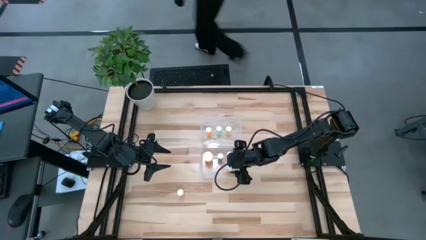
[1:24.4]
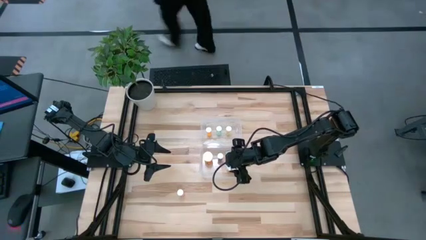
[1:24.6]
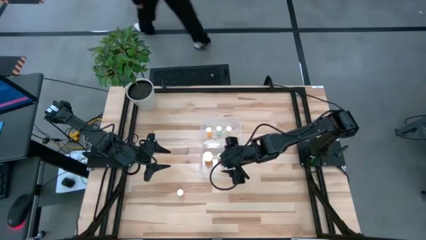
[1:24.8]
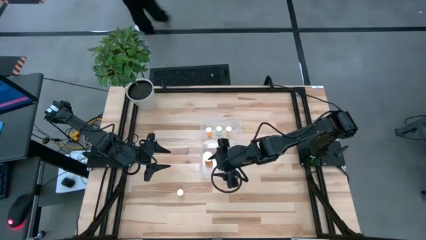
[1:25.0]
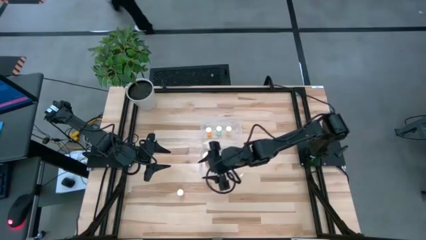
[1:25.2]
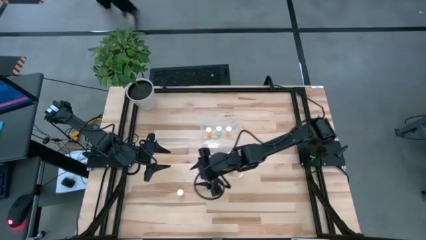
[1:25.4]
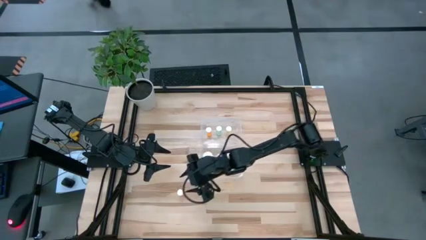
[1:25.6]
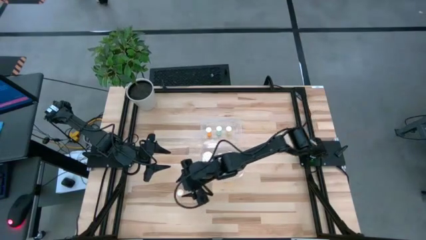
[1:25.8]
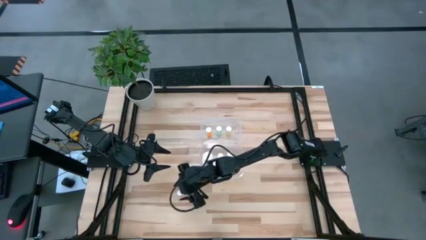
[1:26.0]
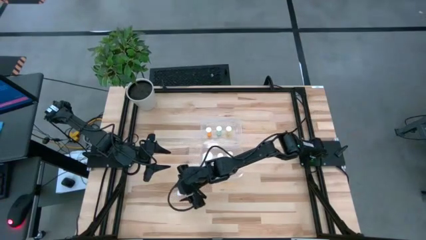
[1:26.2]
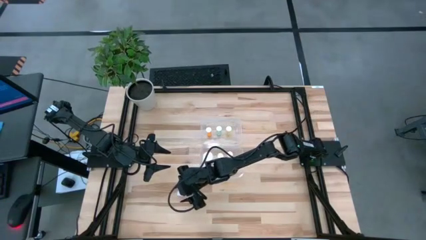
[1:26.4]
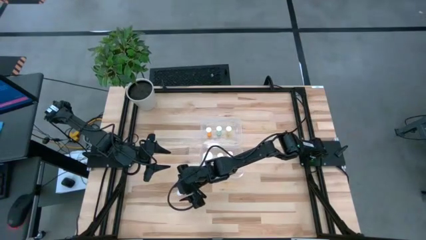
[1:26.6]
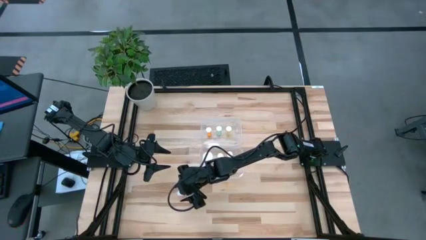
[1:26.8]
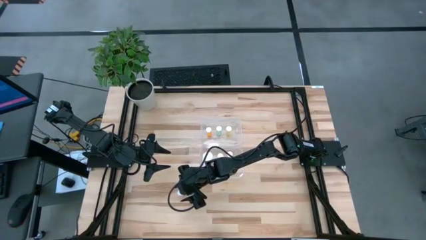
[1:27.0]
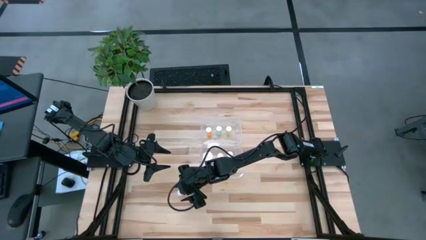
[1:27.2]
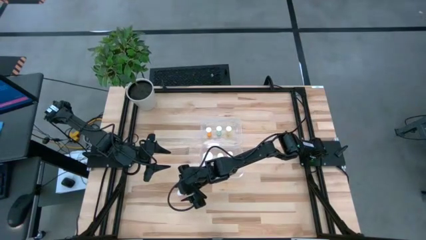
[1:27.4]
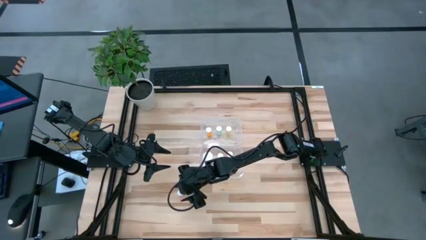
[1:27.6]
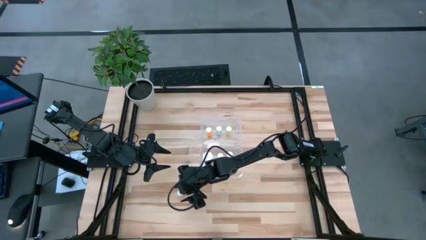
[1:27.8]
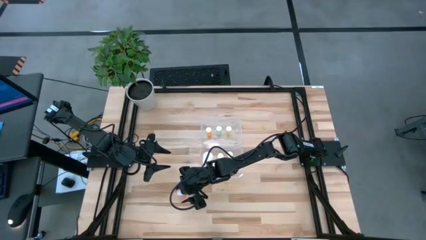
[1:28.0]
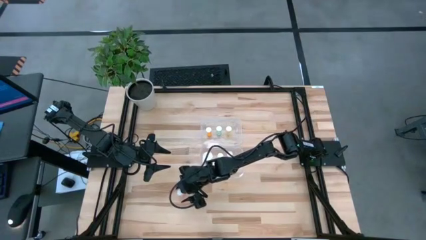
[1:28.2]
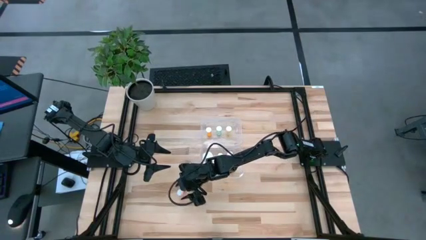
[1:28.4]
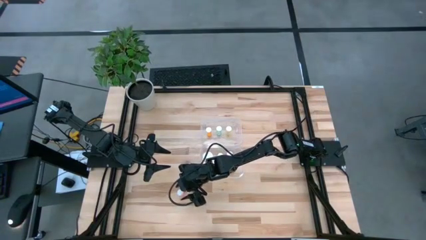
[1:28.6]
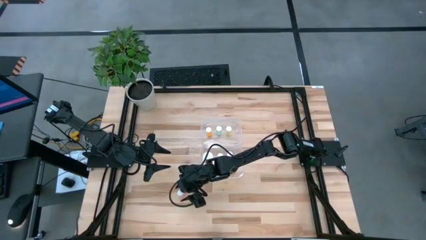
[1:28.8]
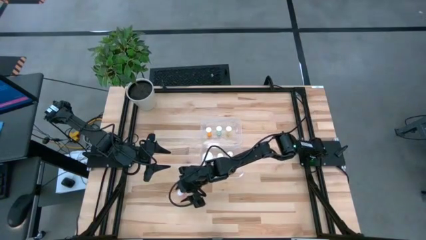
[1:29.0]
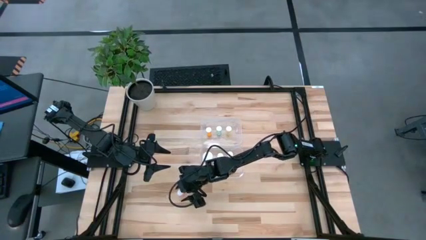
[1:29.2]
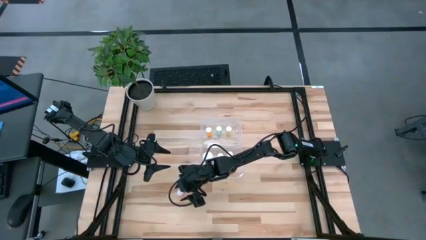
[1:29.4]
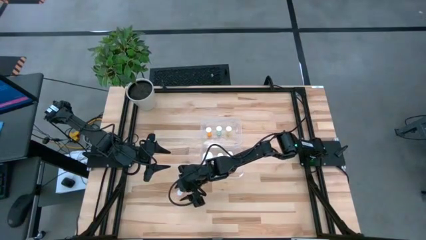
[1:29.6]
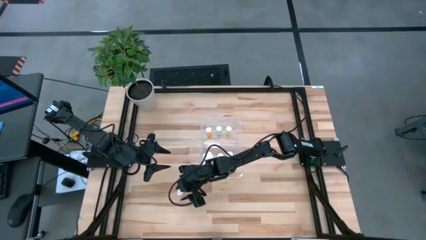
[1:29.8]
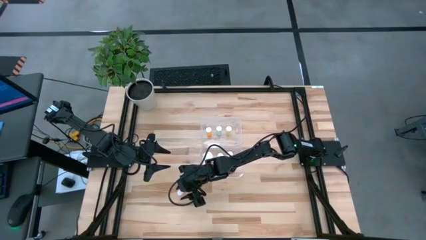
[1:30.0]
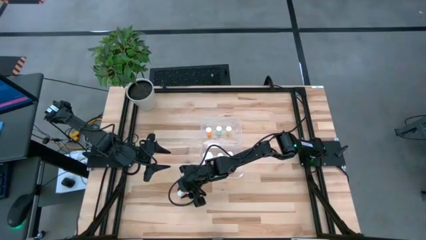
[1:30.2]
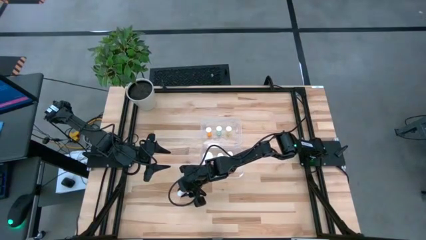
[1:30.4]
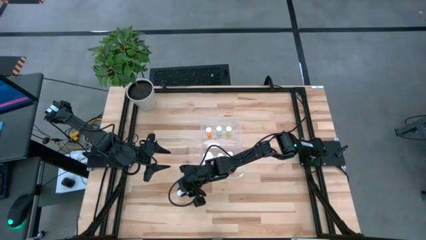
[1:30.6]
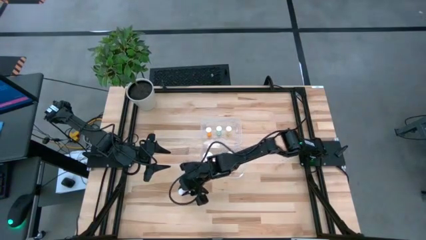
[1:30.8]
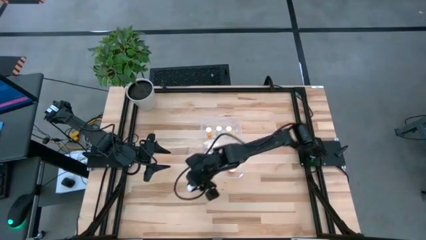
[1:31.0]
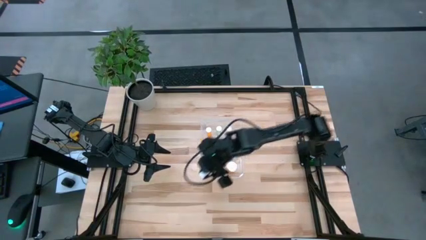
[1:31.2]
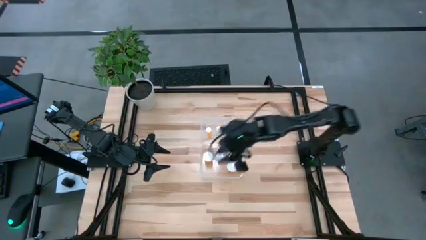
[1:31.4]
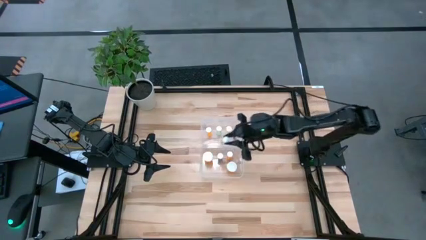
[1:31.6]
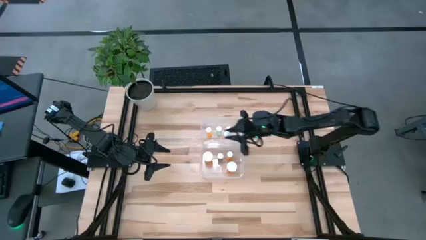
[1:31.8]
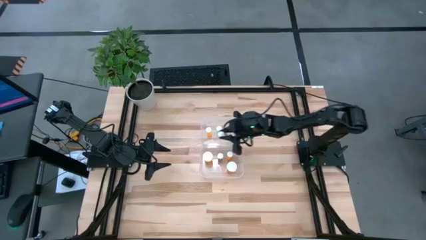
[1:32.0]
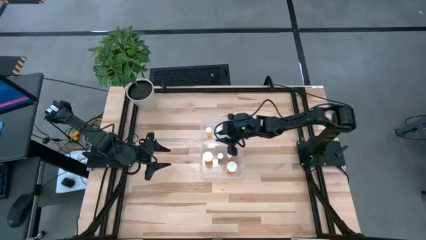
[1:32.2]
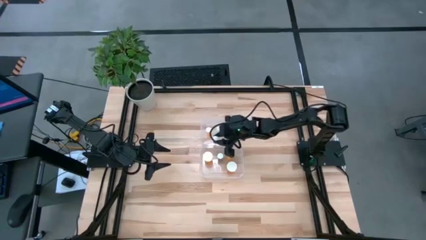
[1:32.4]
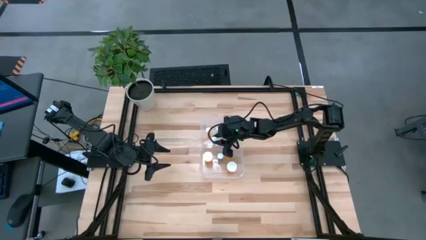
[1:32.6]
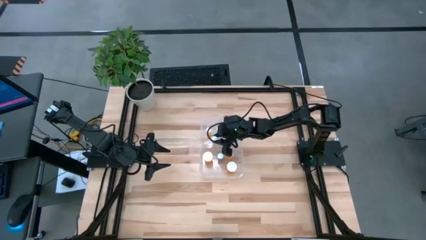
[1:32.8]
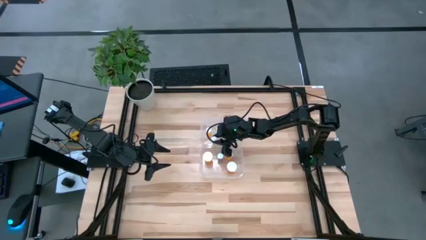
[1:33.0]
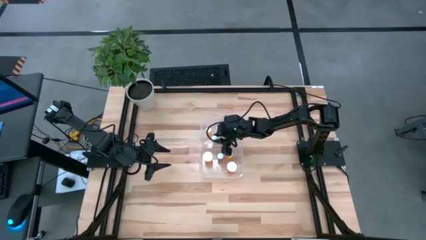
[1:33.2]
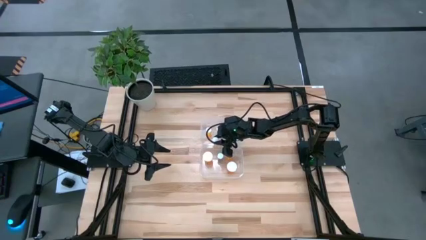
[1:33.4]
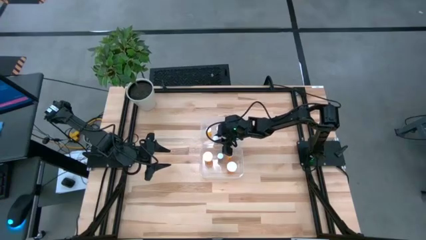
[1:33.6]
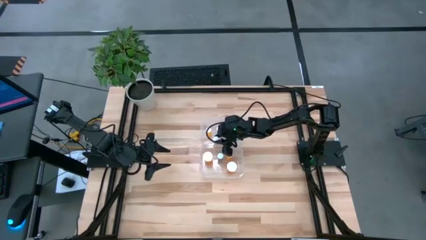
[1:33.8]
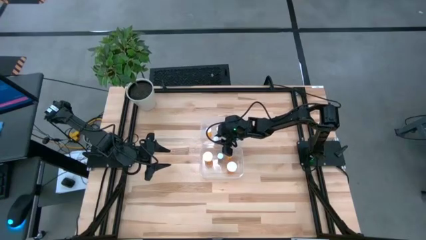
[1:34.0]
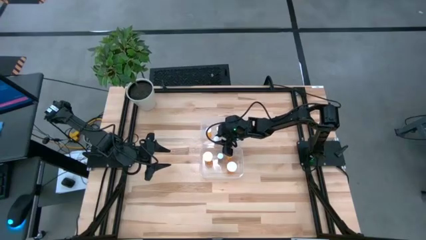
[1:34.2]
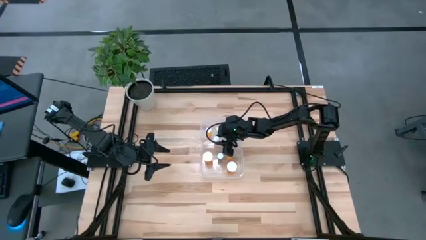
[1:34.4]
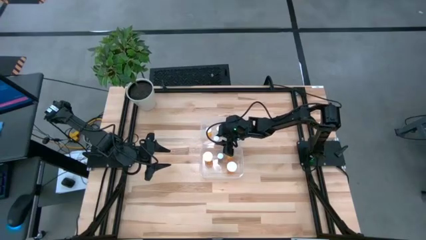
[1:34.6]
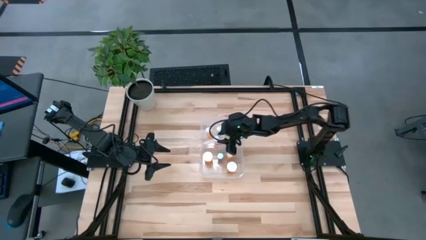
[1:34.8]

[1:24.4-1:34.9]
Task: Pick and place medicine bottles into bin by pill shape (circle, oval)
Put the pink tablet bottle into the top transparent bin

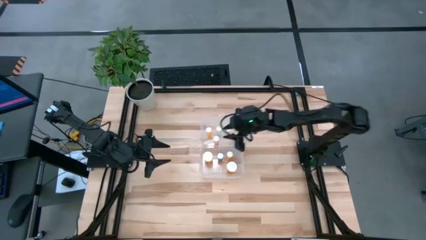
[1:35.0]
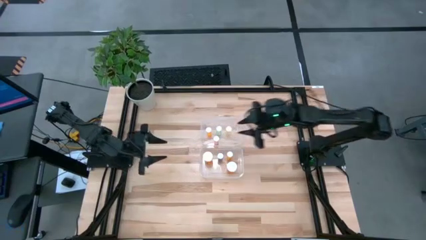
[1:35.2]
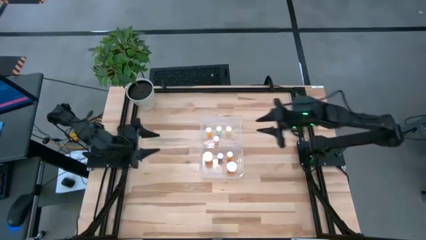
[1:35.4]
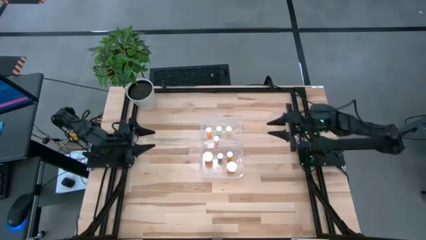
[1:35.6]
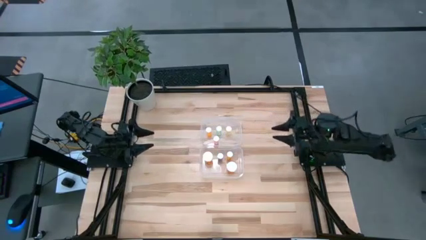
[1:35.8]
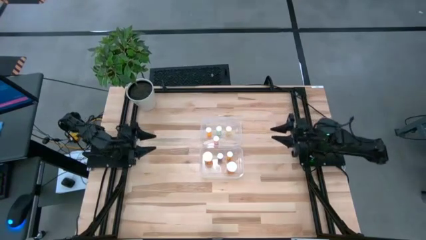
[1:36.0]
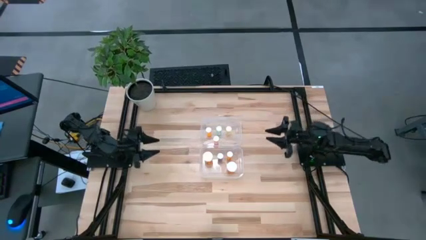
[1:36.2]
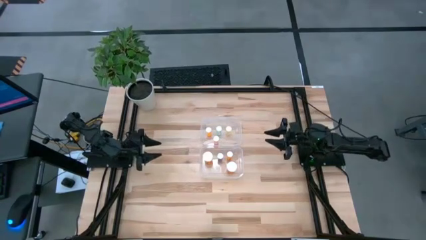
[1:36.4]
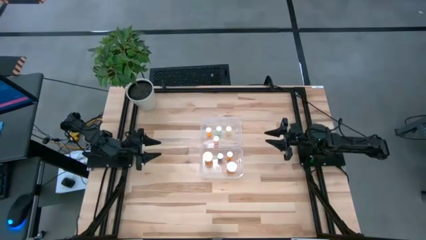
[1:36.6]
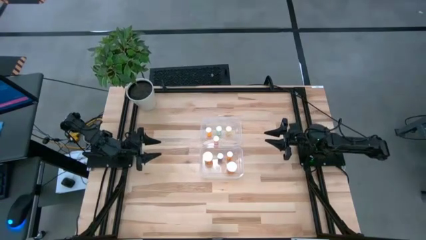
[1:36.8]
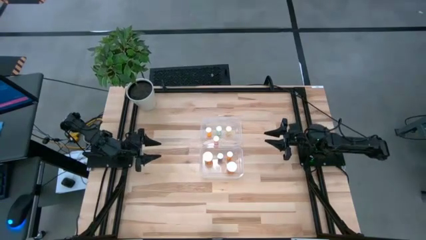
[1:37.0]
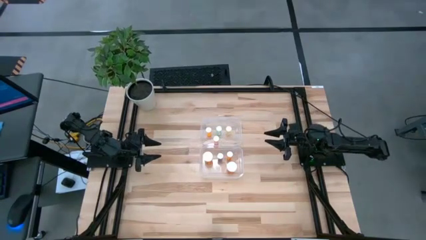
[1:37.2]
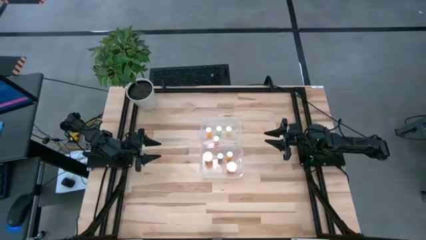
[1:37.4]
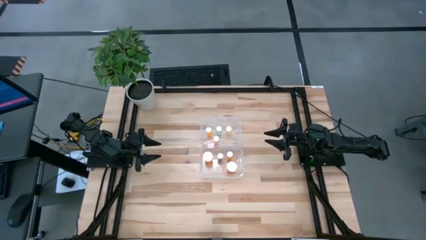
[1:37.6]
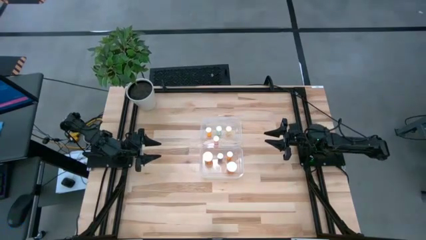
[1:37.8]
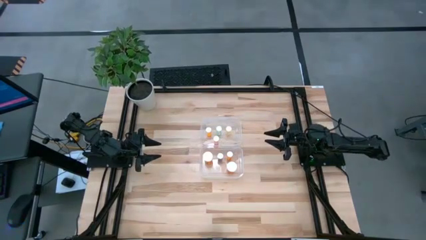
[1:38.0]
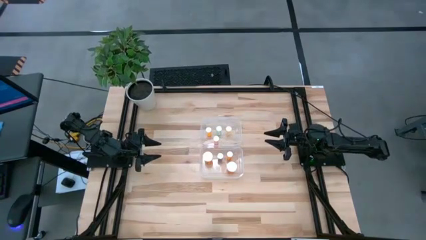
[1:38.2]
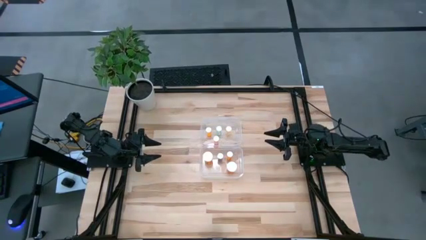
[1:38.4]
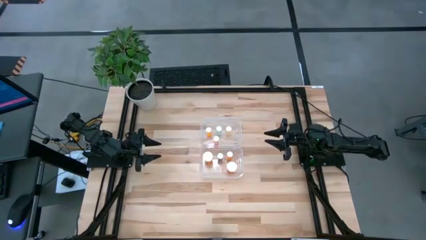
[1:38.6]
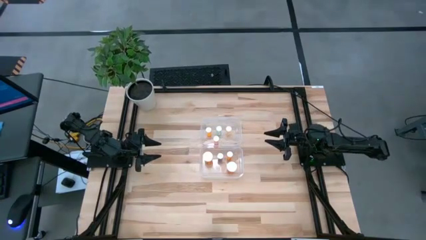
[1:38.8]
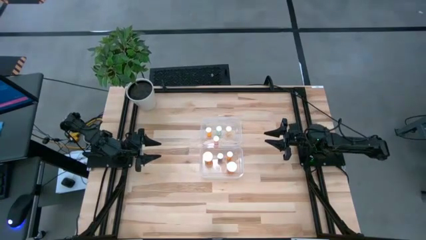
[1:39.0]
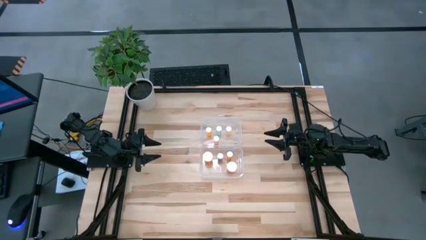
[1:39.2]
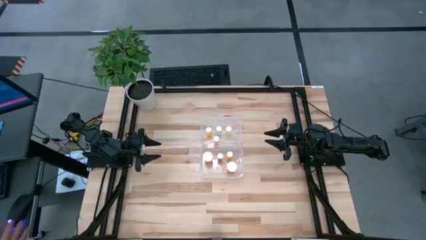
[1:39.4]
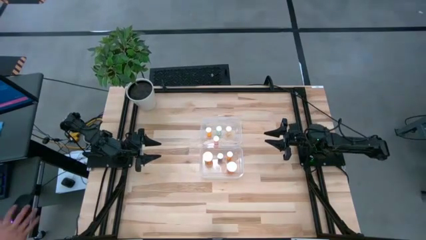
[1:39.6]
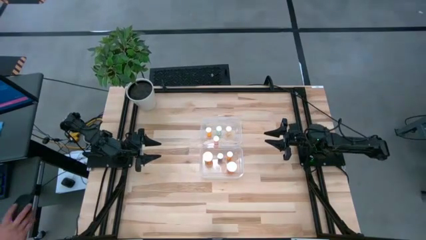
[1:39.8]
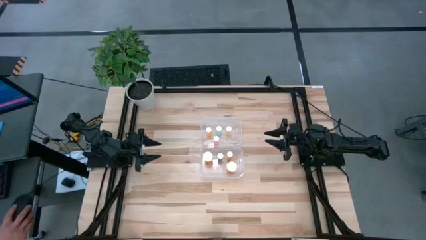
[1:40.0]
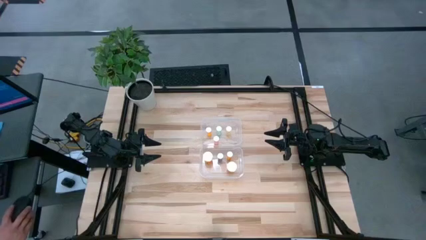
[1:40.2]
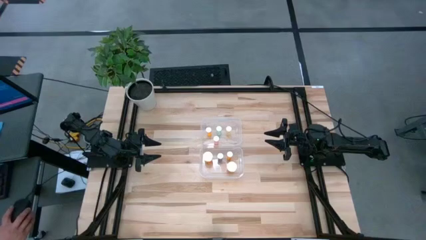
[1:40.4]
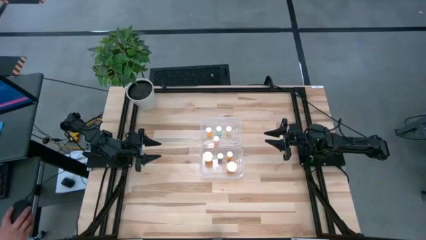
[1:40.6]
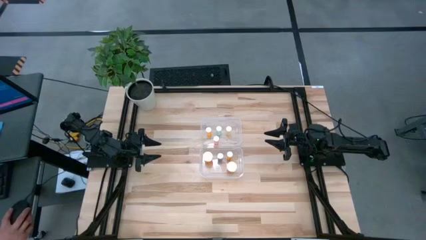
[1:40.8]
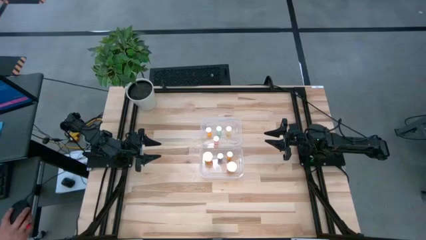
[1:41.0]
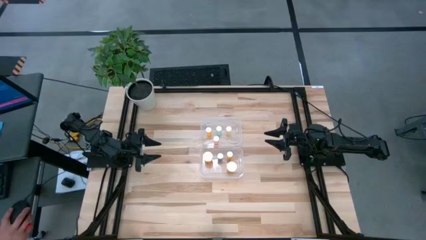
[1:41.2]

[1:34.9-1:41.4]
Return to Home Position
